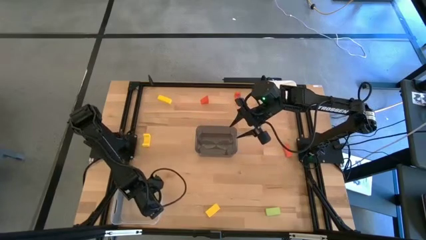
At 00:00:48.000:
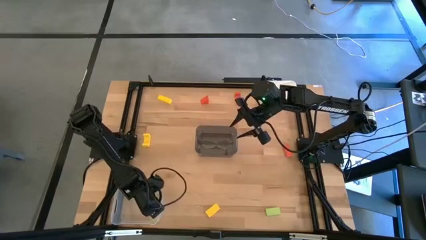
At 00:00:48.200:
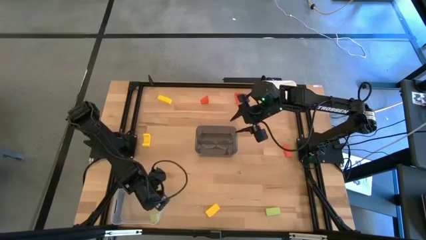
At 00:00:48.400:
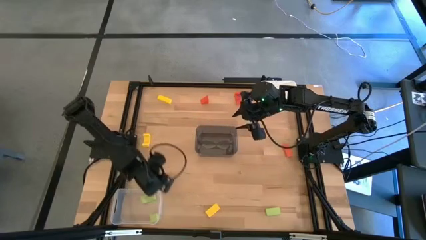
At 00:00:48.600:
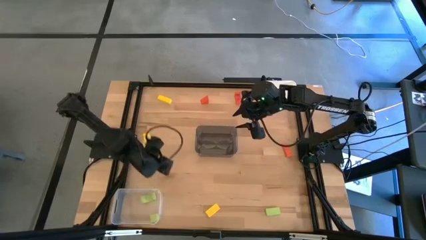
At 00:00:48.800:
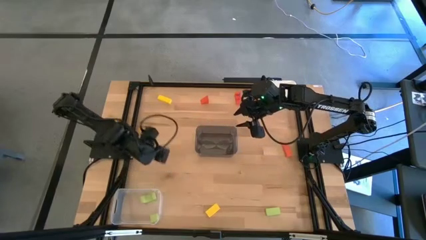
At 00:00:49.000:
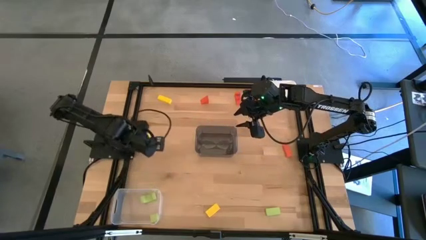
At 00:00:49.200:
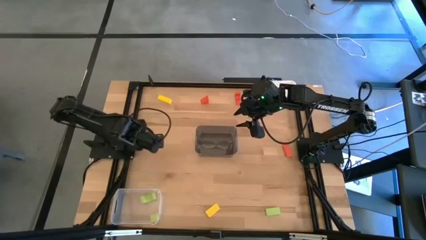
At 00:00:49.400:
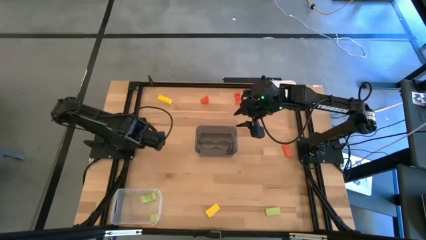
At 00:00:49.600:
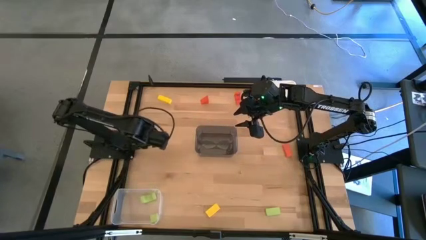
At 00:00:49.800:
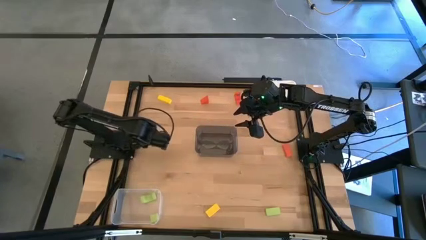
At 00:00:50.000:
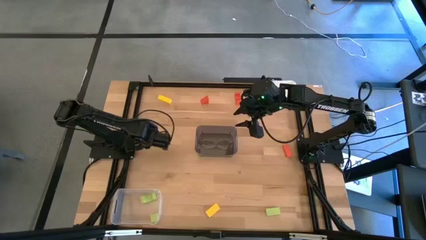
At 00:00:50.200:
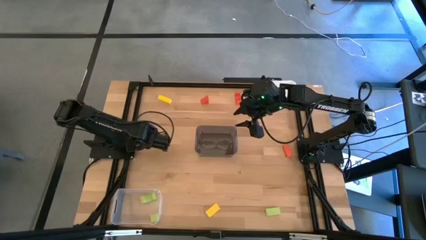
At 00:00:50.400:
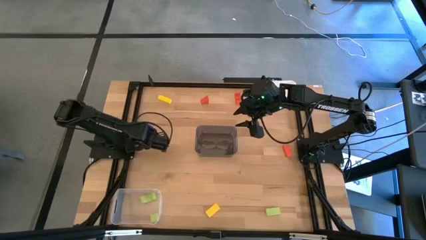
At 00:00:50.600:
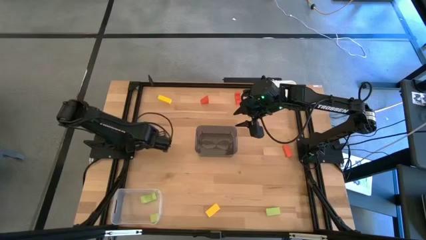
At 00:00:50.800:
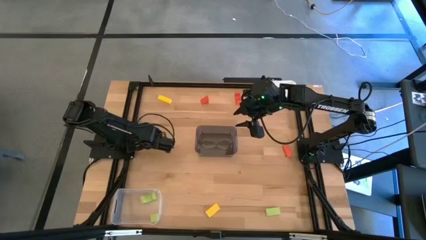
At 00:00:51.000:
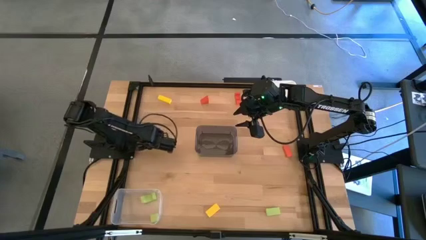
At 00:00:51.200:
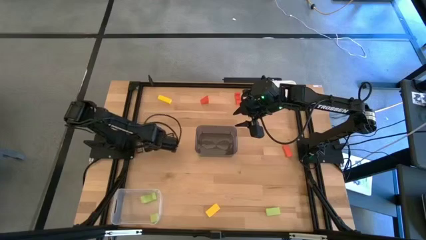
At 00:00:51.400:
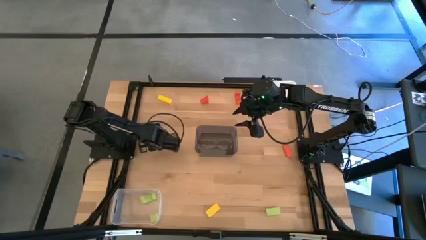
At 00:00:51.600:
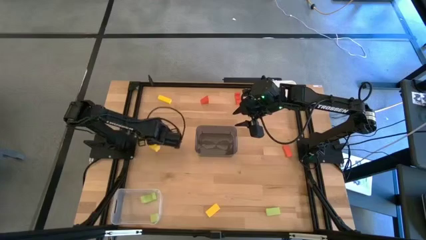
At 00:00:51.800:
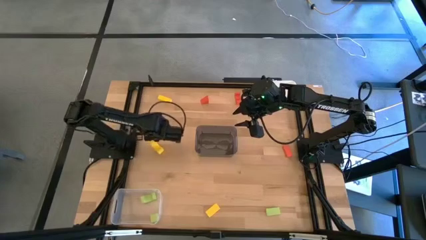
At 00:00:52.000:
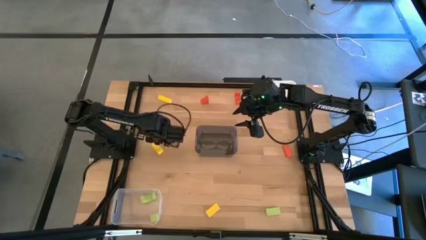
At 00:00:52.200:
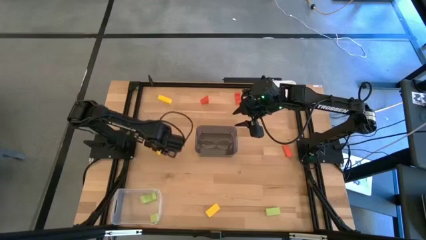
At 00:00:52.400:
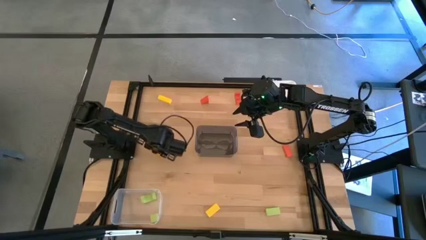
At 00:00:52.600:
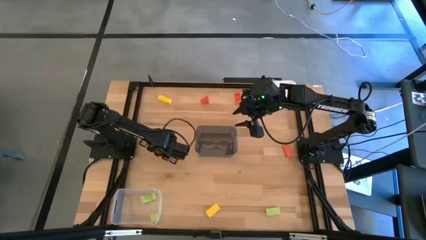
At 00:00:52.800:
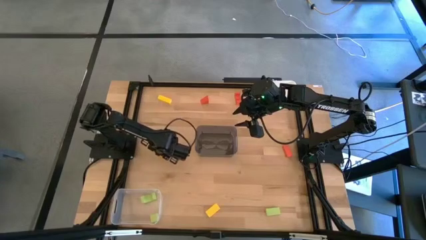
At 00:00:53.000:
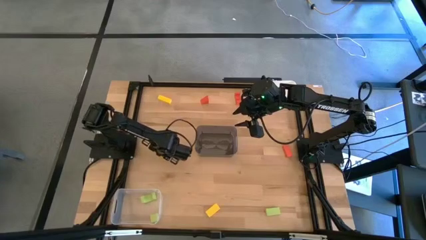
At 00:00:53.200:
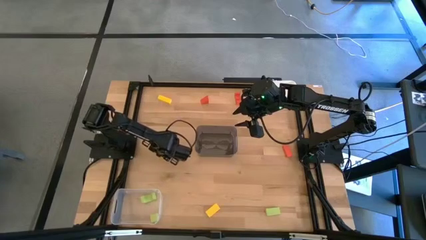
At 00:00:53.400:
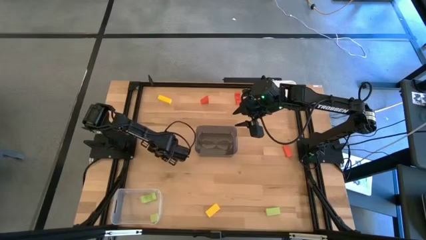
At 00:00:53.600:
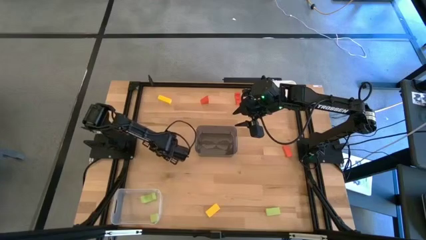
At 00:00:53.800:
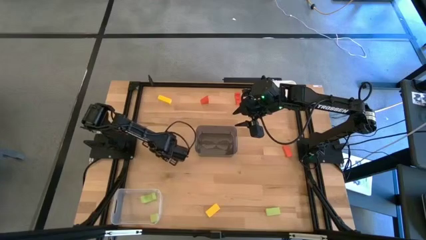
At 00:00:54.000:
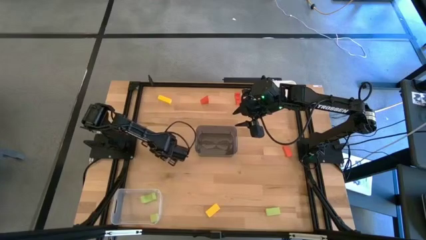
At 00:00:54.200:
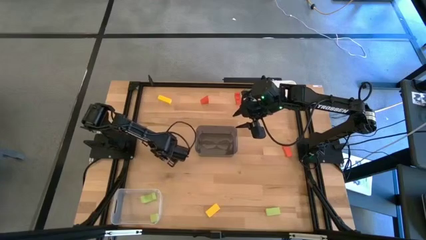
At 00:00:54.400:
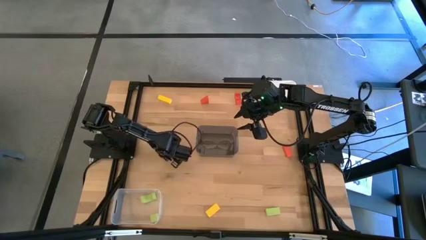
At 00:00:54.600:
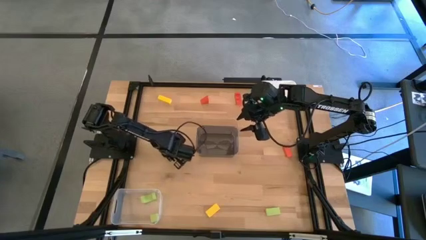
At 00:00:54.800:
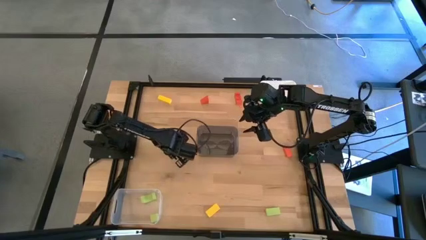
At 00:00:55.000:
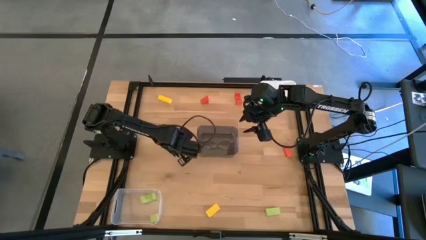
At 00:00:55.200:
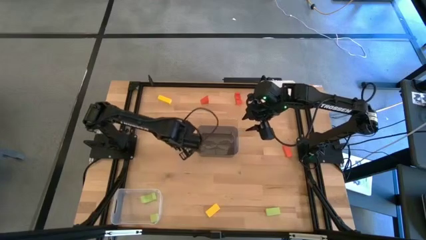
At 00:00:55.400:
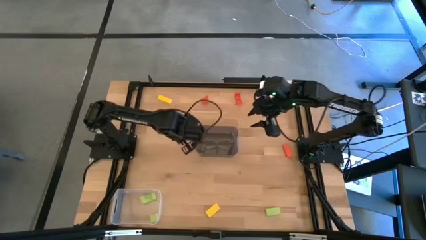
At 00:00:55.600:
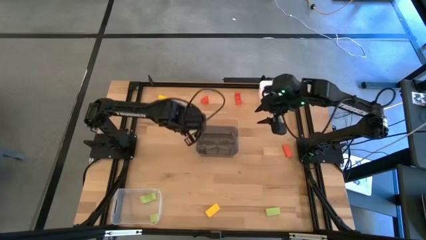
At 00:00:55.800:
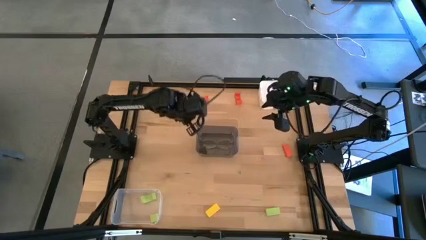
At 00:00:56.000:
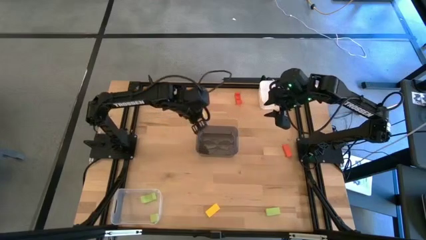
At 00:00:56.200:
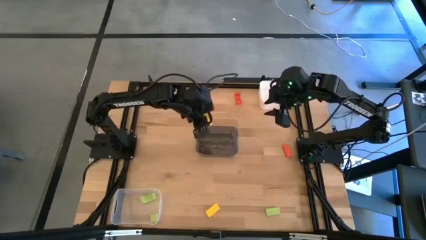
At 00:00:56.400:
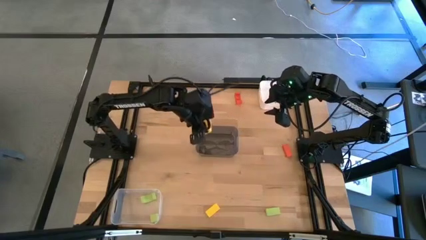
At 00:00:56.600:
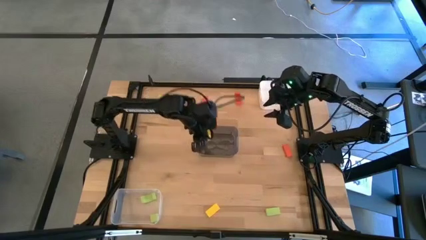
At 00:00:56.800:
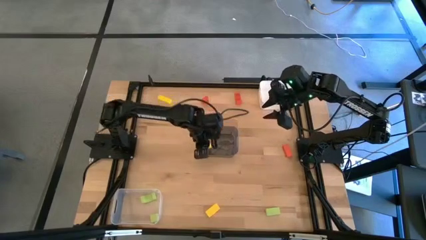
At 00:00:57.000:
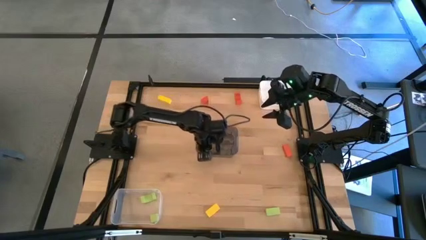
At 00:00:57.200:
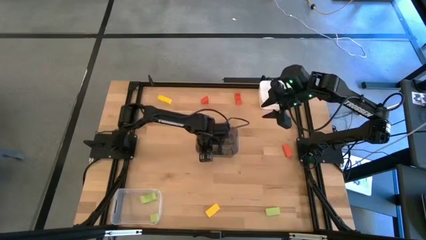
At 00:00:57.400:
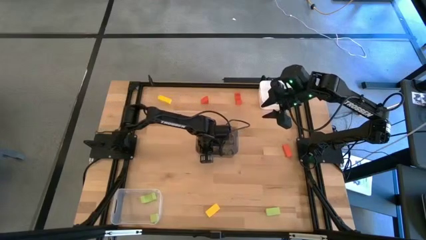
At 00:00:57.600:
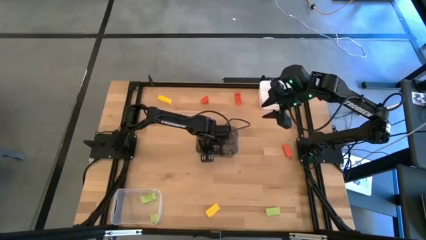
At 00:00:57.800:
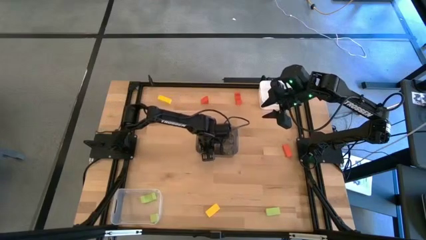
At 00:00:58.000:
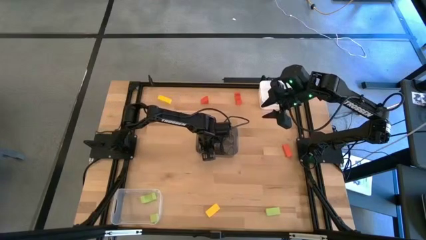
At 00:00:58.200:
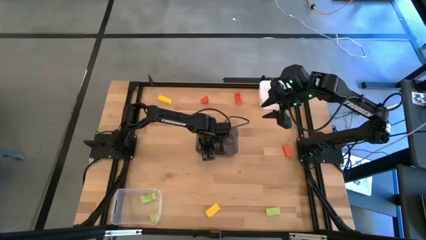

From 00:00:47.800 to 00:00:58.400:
Task: Sort & place blocks by color
Put the middle left yellow block into the black bin

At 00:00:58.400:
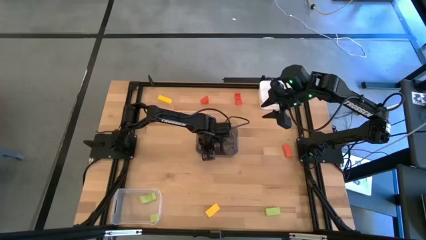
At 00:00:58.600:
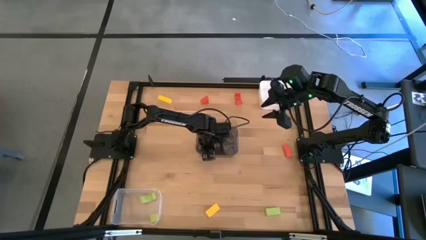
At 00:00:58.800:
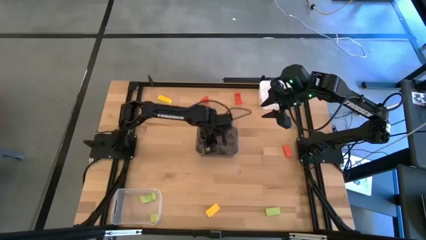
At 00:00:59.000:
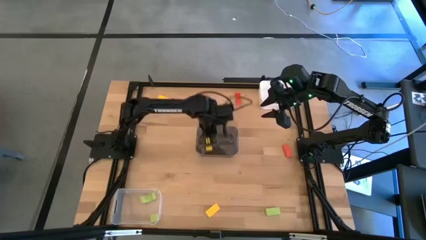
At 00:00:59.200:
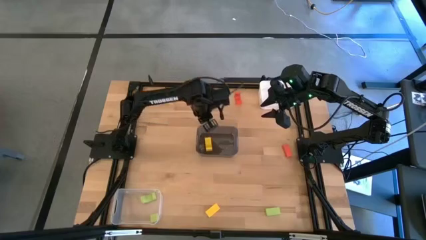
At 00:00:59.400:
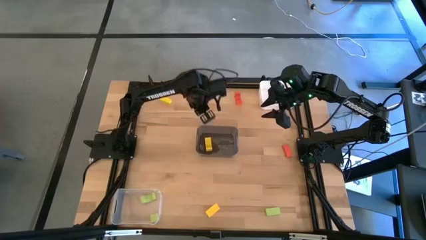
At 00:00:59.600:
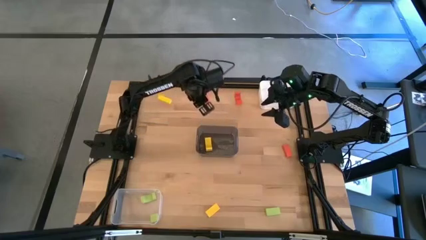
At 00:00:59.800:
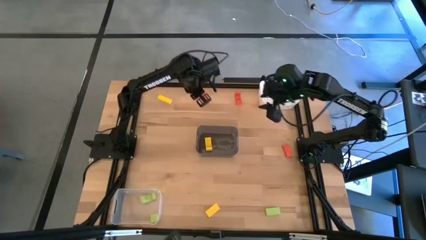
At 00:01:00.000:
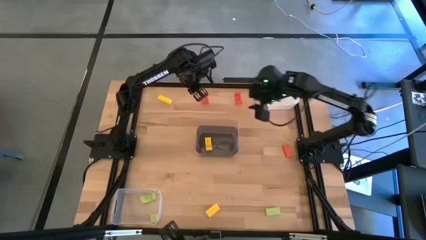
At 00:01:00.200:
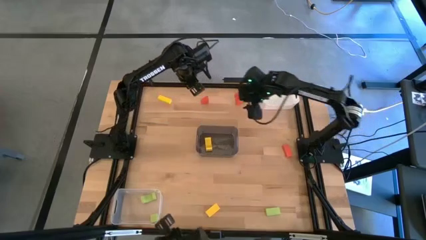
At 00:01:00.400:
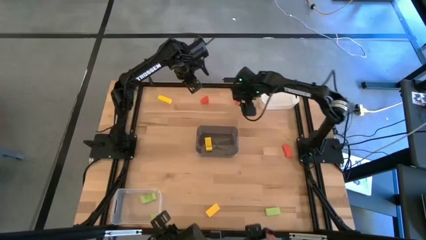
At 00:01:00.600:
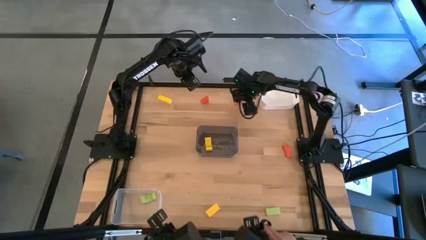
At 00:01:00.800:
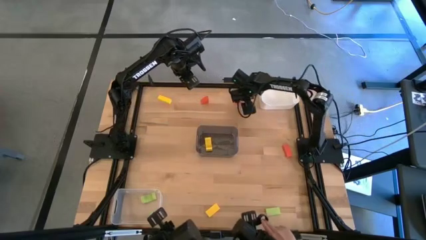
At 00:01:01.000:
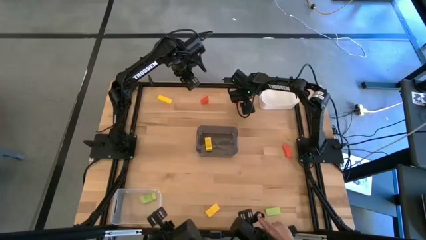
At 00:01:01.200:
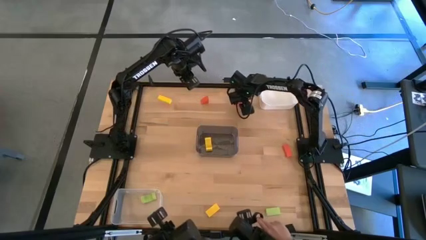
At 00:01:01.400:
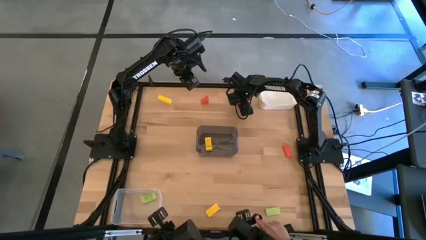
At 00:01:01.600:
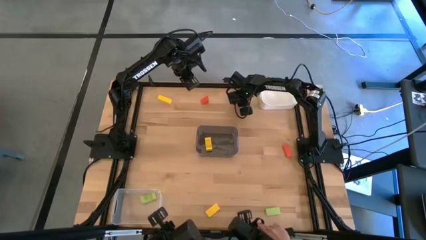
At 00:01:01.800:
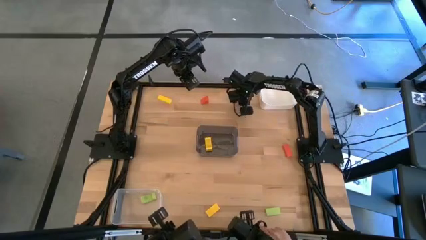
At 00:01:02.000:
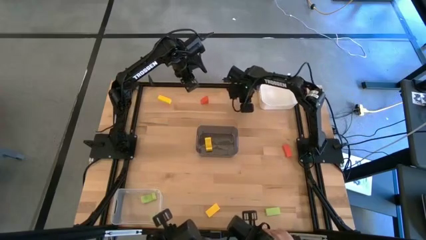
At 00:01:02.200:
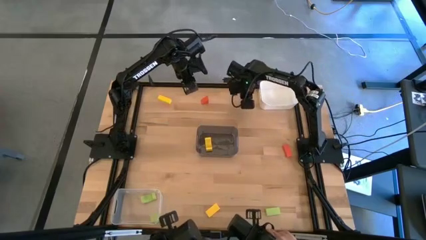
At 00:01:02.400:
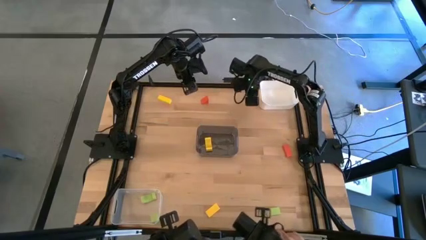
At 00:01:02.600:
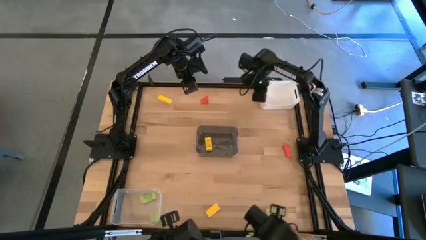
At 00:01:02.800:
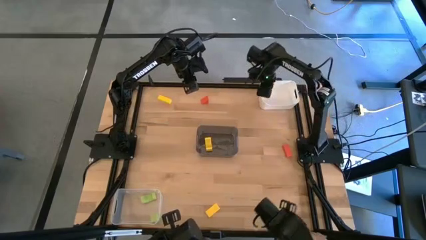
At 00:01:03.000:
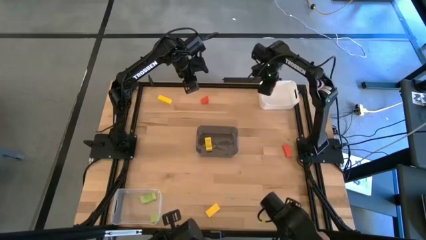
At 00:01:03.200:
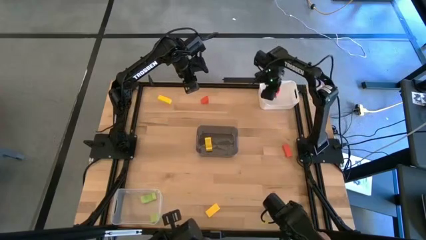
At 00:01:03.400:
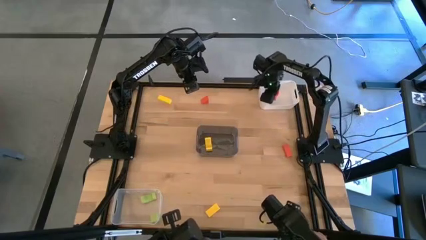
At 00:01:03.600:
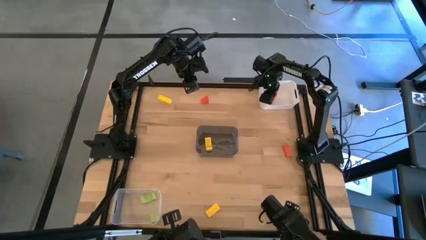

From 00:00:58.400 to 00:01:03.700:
Put the top right orange block into the white bin
